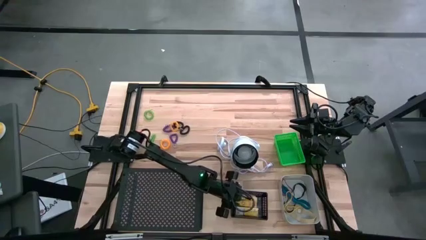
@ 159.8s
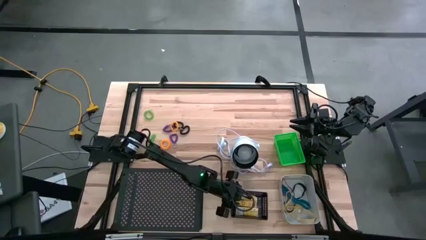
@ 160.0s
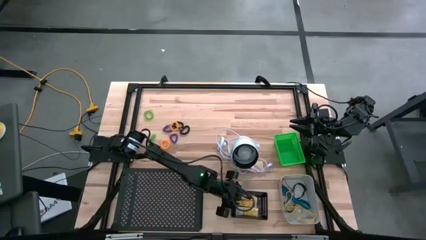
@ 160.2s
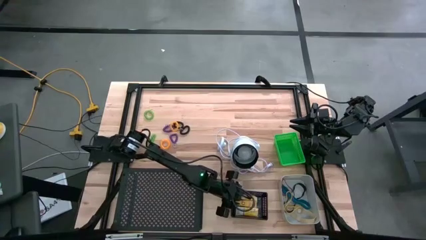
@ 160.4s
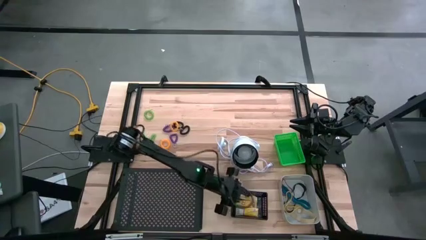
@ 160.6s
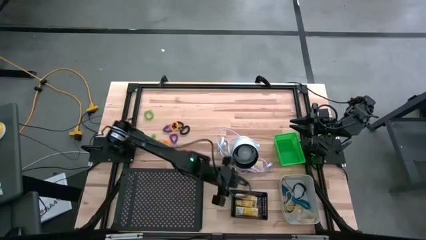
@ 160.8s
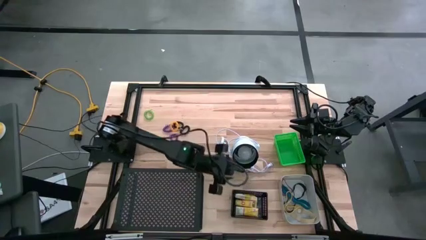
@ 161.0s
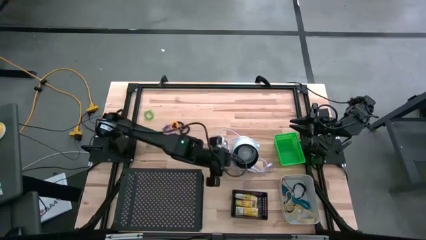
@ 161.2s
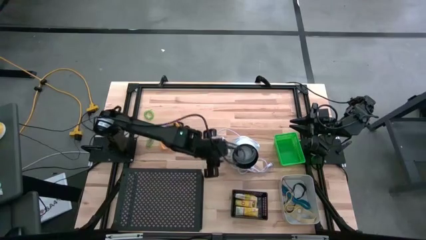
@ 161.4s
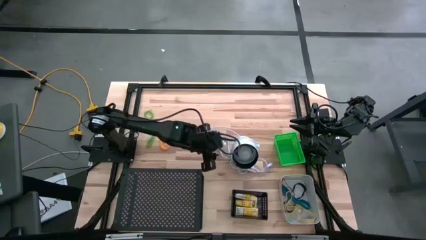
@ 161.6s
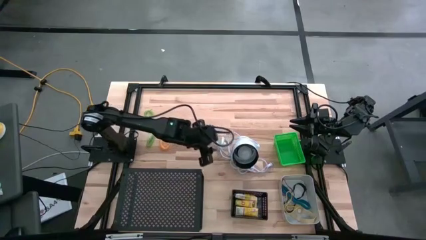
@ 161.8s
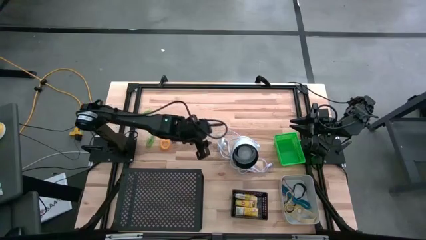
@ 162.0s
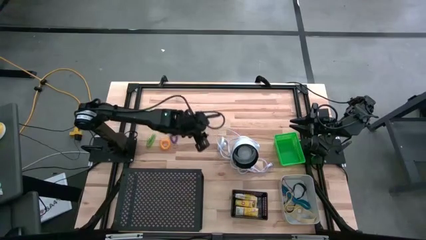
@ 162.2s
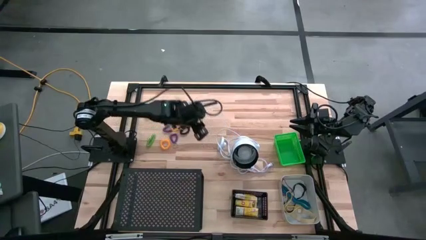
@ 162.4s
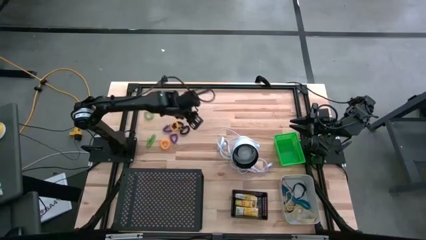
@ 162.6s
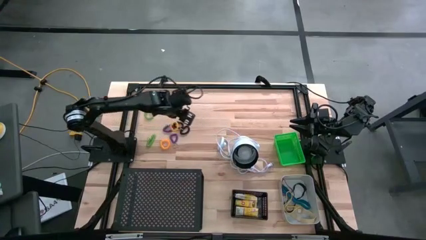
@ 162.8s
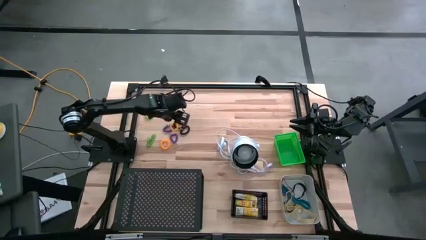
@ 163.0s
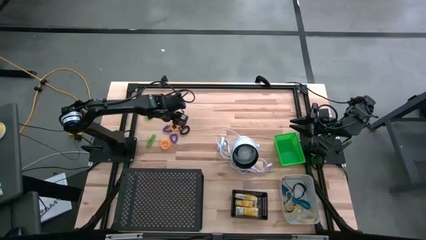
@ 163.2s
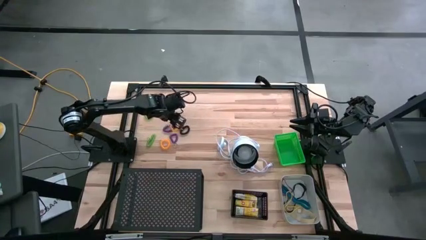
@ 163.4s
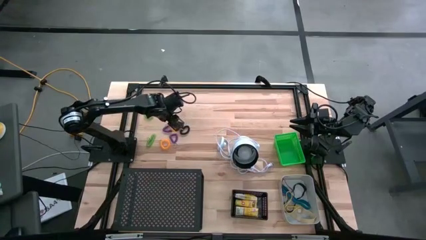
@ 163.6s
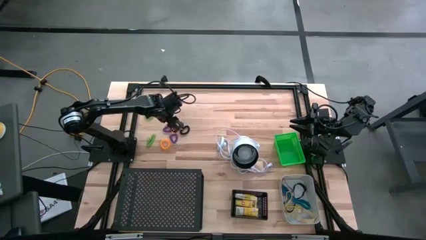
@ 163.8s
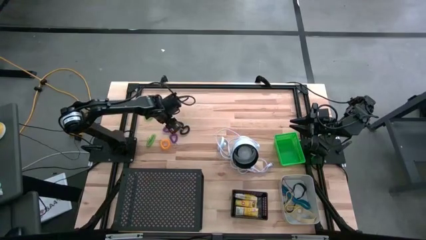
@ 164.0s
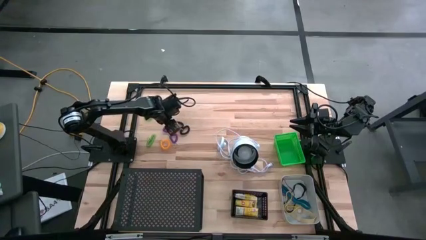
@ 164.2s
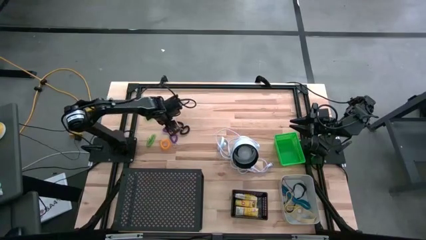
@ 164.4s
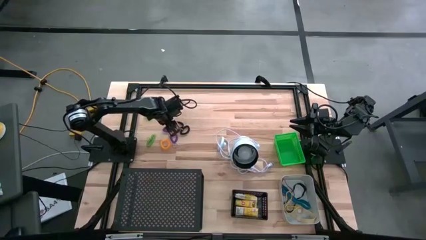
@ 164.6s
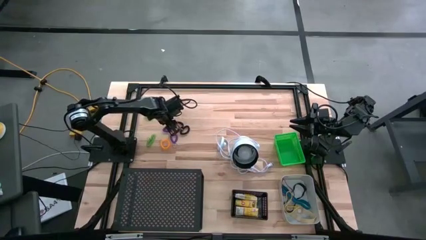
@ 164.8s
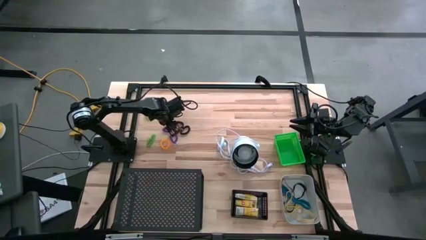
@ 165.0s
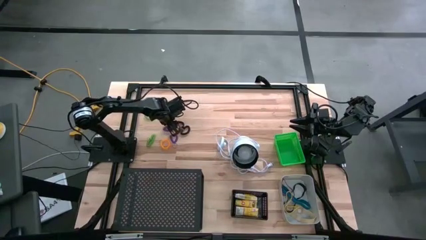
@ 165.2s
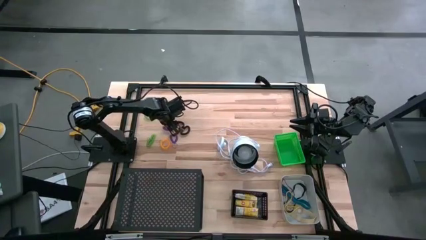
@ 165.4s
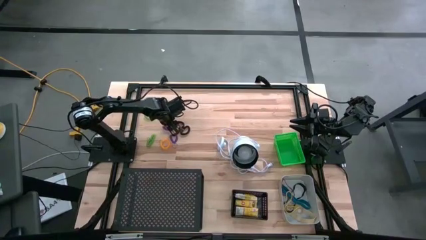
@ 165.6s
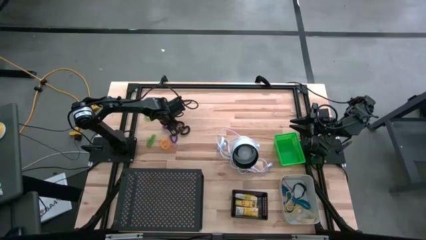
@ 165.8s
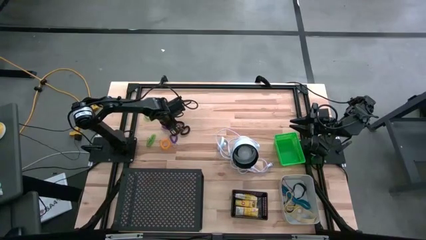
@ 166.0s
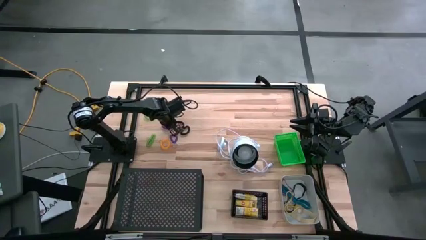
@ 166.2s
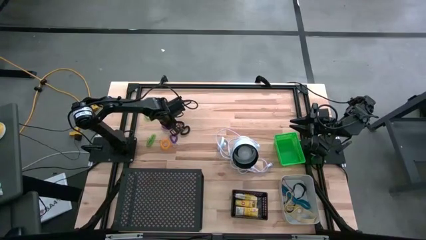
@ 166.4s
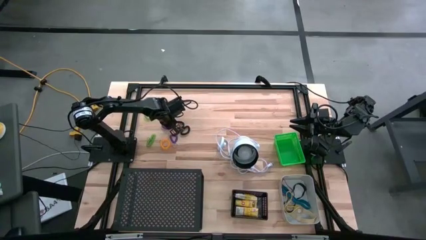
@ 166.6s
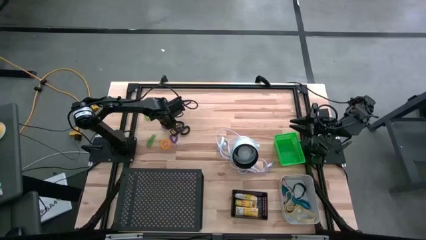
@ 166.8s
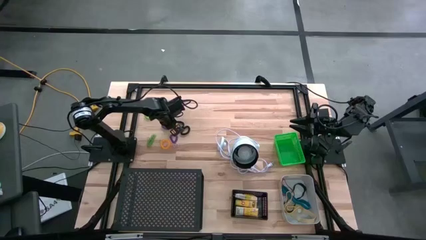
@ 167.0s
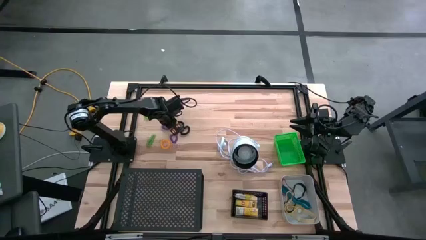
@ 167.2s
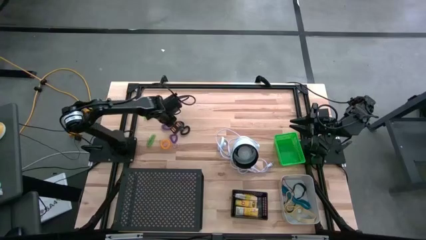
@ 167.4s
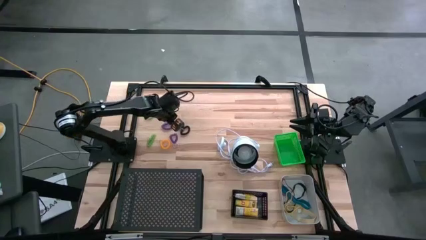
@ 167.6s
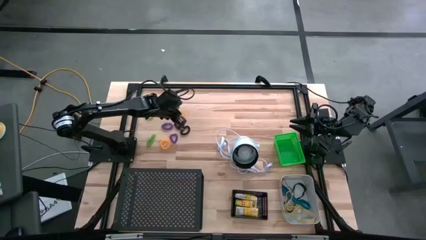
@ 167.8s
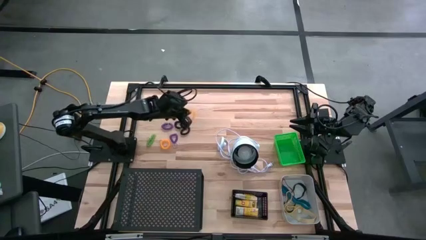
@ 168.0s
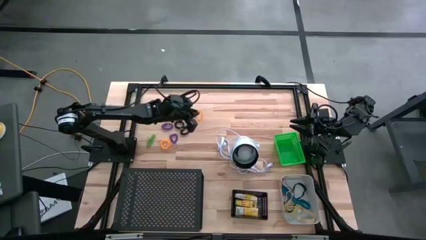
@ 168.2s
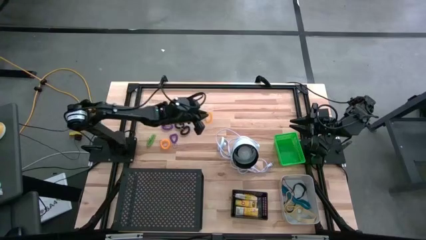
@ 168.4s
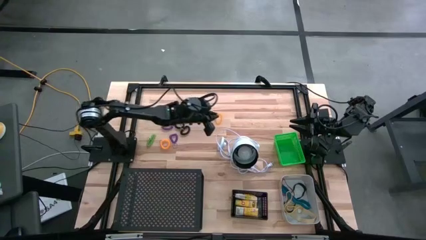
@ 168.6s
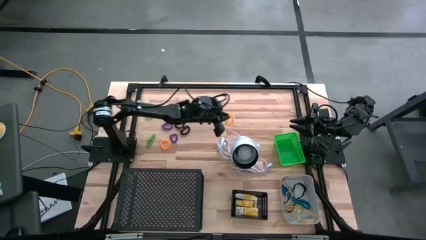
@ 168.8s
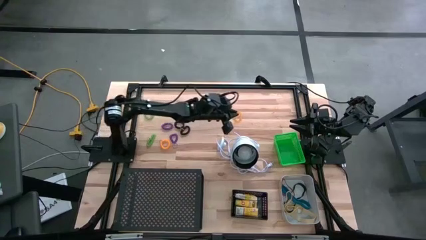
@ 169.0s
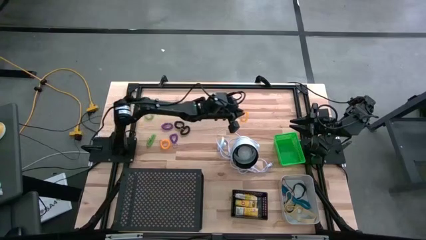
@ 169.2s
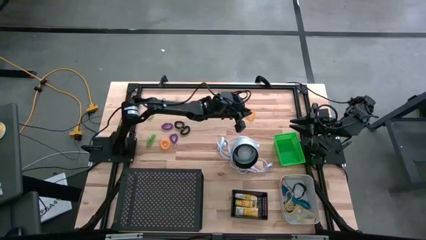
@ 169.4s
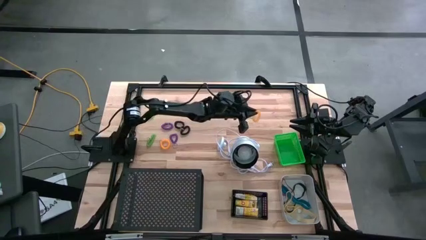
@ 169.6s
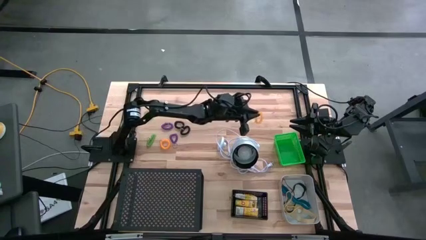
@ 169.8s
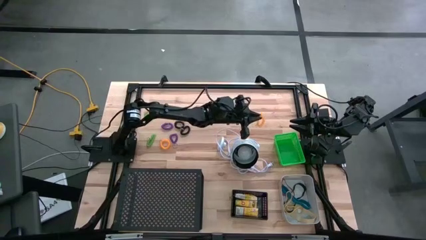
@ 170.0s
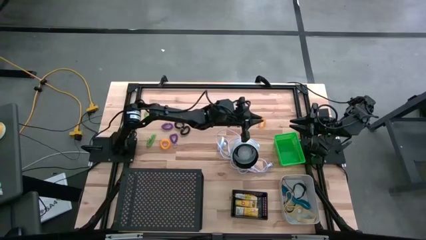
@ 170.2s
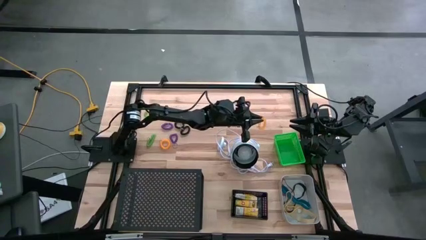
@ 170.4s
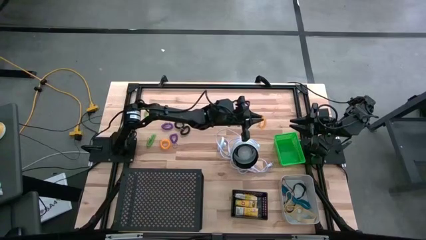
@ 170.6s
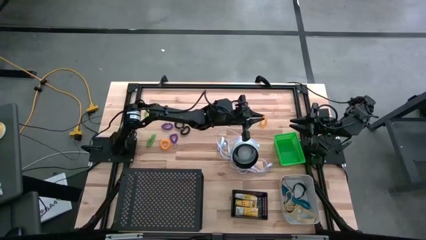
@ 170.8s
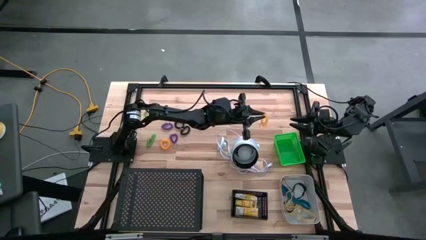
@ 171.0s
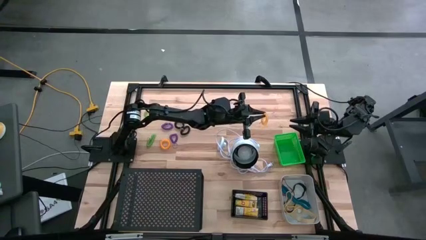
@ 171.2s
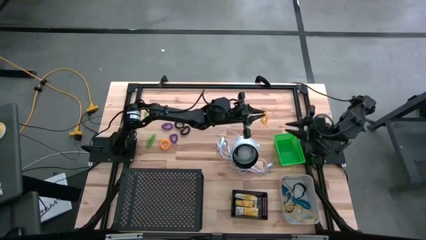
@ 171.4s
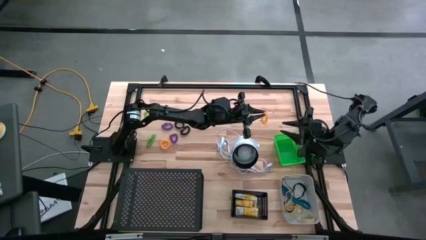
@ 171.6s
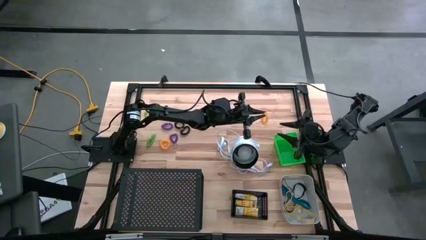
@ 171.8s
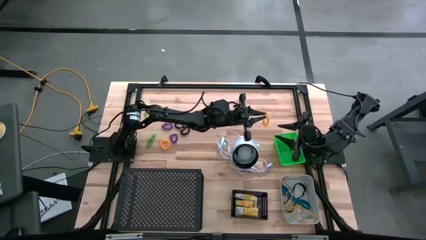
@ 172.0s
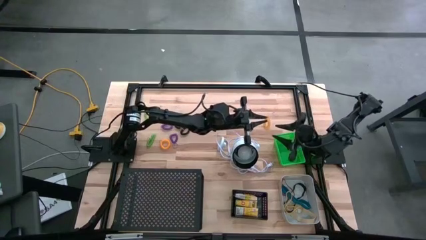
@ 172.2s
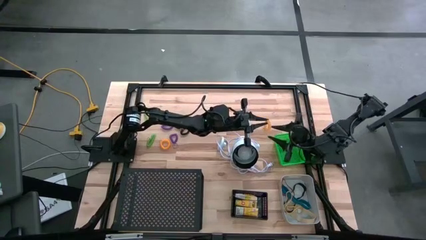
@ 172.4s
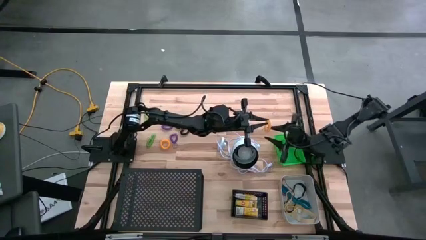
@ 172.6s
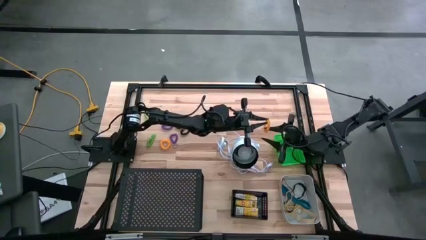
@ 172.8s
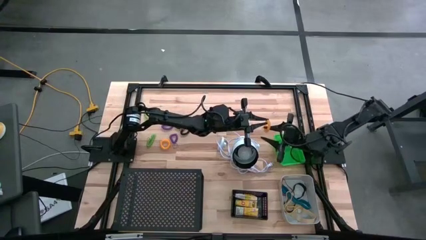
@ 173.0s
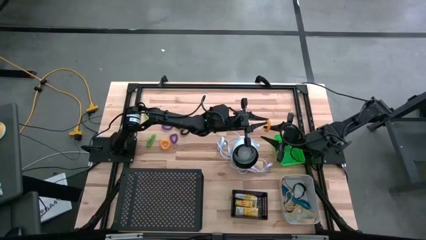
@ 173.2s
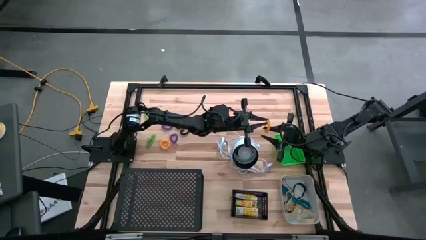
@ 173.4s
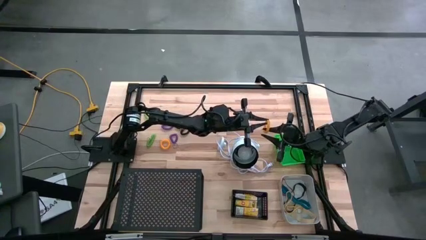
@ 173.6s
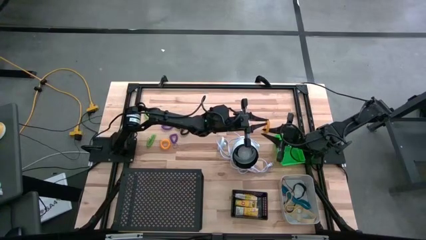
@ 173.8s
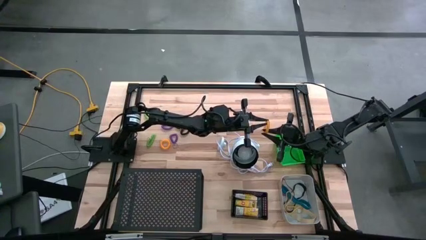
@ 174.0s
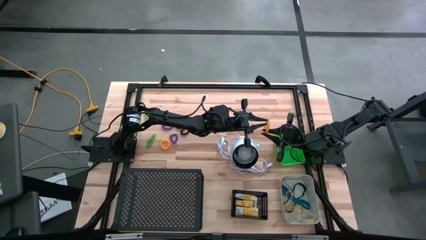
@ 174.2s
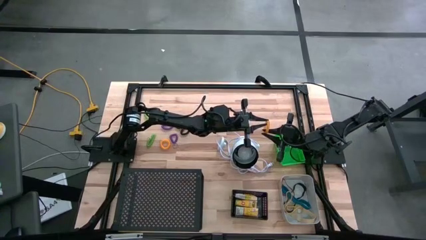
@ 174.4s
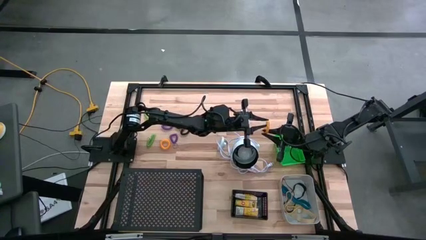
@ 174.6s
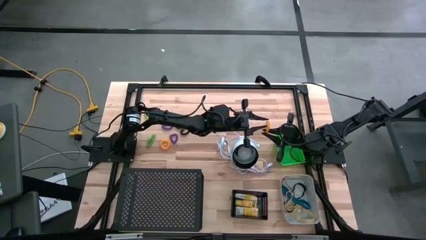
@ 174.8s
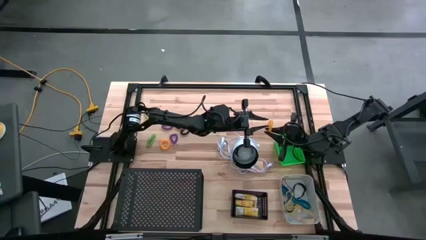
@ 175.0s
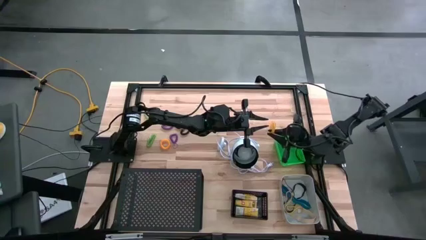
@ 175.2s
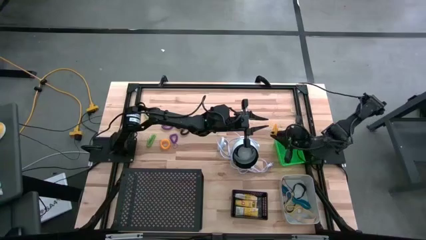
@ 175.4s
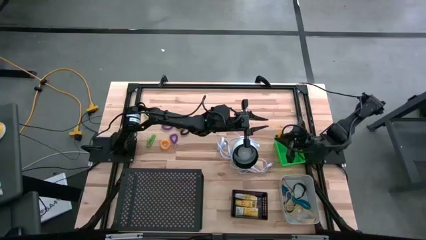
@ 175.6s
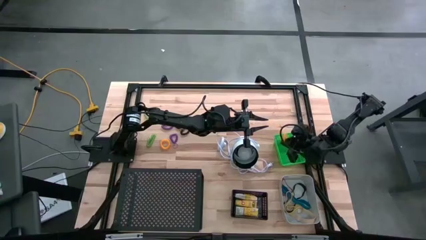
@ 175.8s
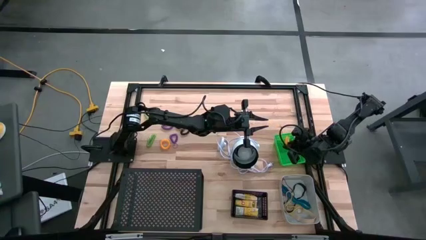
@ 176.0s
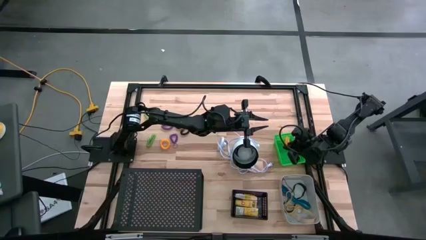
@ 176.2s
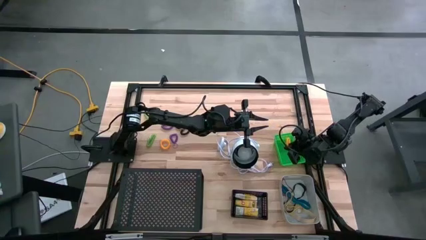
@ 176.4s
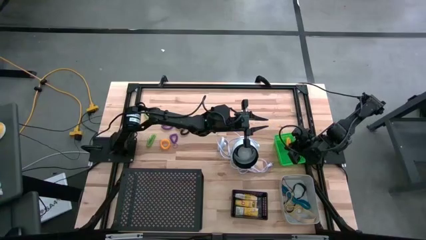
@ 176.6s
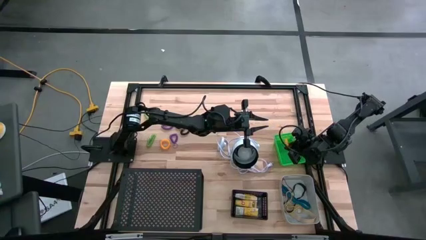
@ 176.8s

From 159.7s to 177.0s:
Task: Pick & Place Office Desk Supplies
Put the top orange spring keychain into the green bin
